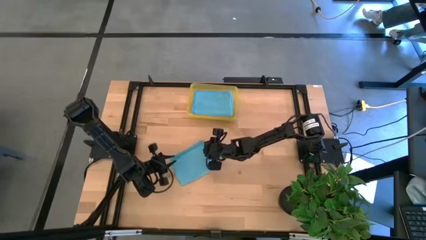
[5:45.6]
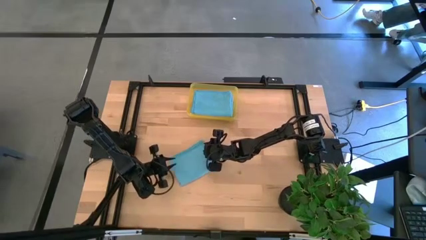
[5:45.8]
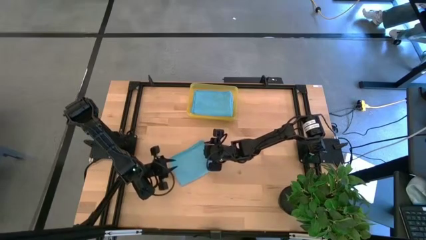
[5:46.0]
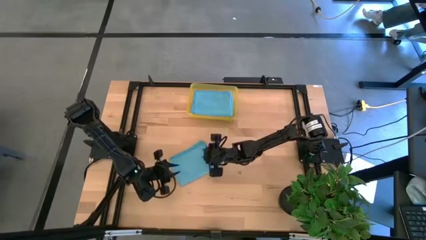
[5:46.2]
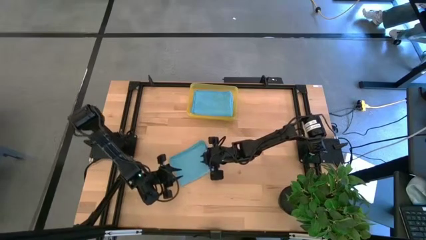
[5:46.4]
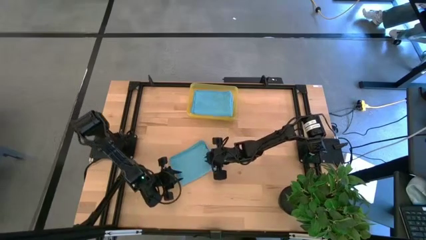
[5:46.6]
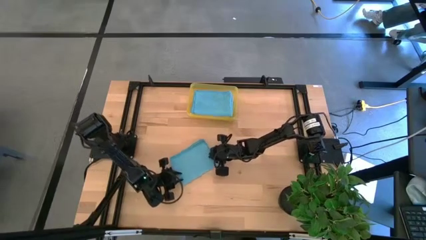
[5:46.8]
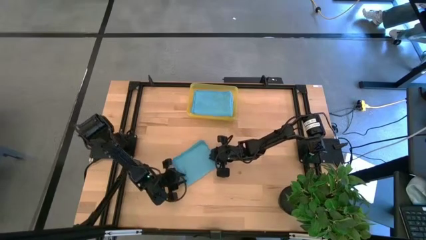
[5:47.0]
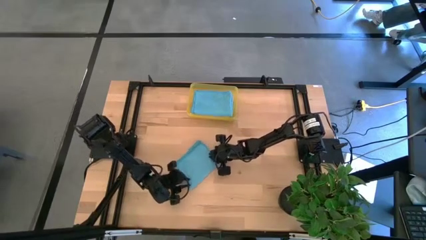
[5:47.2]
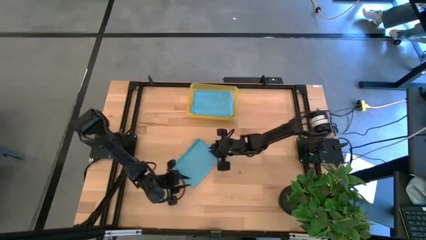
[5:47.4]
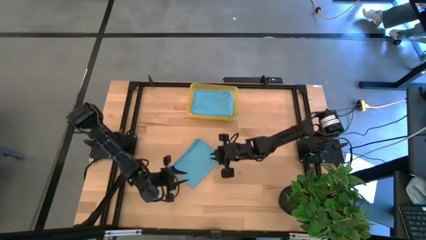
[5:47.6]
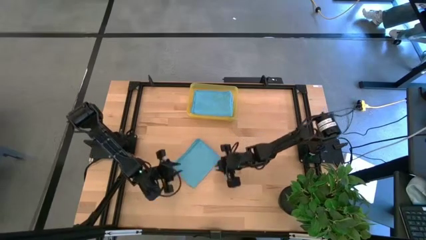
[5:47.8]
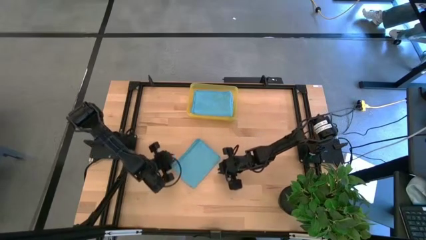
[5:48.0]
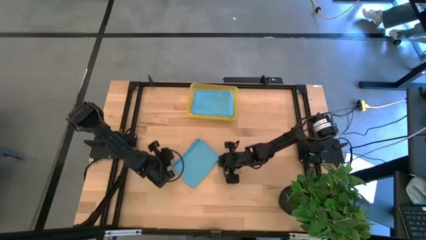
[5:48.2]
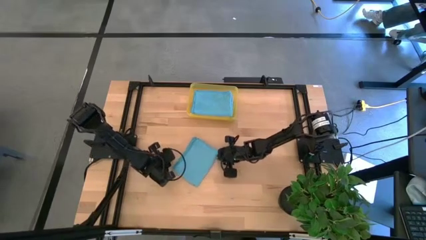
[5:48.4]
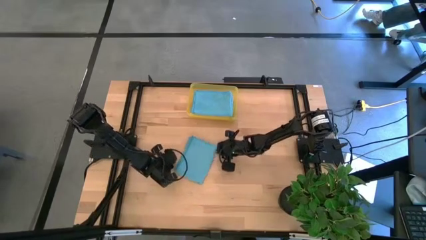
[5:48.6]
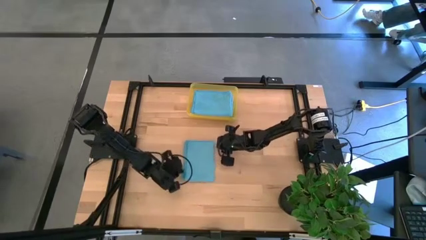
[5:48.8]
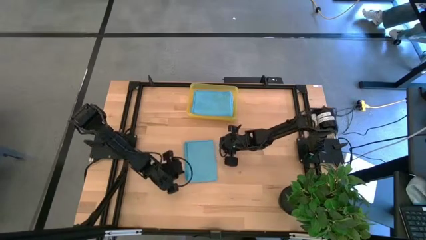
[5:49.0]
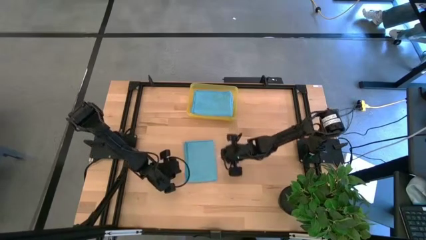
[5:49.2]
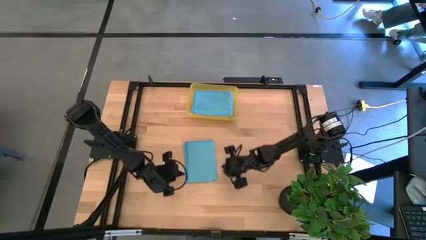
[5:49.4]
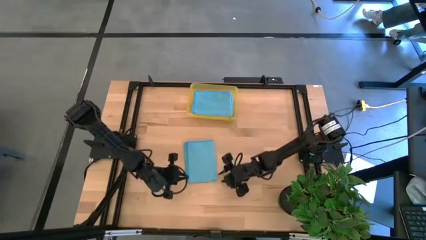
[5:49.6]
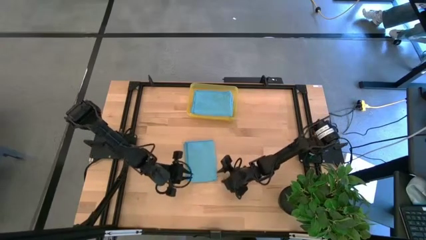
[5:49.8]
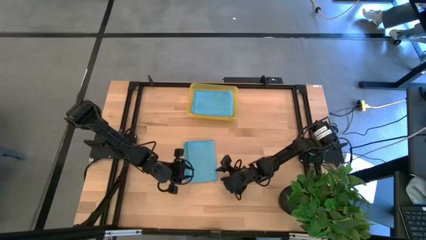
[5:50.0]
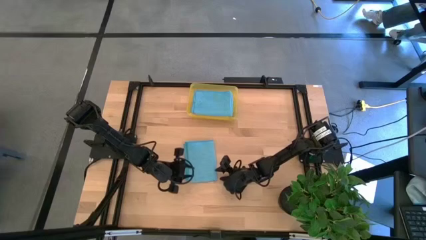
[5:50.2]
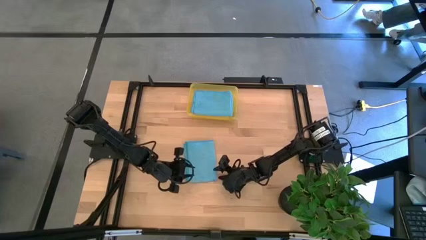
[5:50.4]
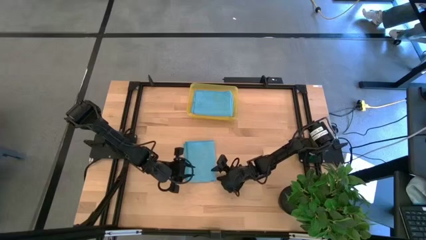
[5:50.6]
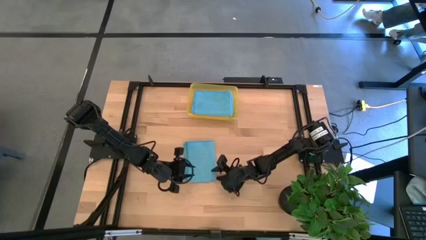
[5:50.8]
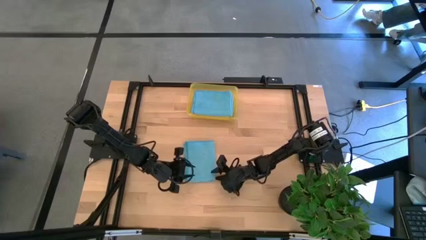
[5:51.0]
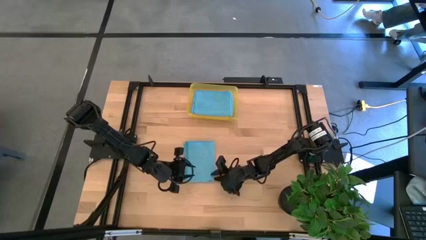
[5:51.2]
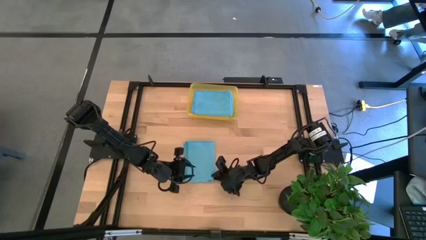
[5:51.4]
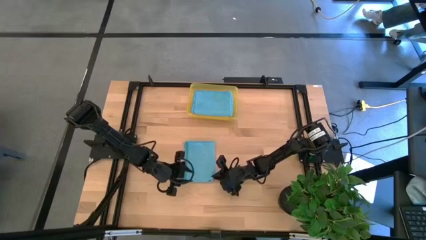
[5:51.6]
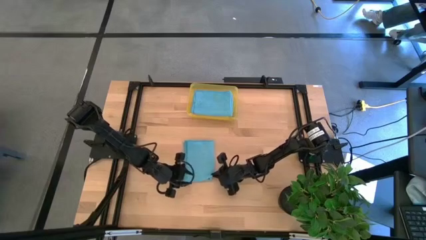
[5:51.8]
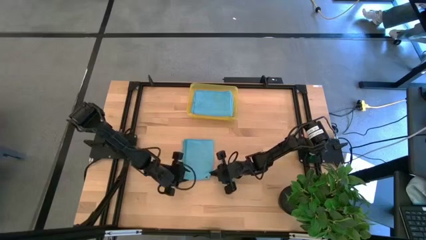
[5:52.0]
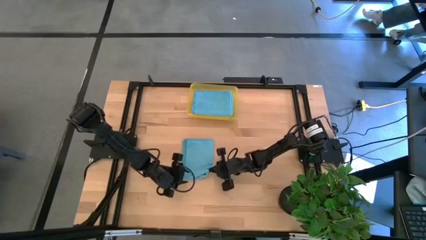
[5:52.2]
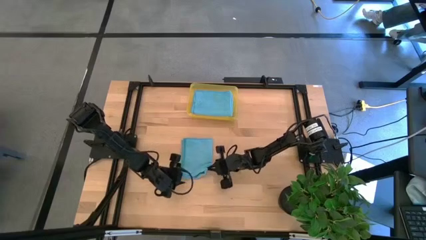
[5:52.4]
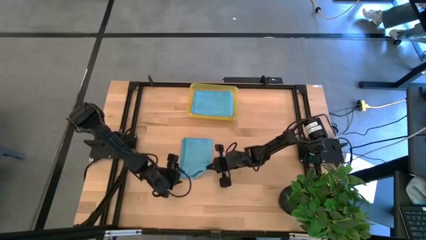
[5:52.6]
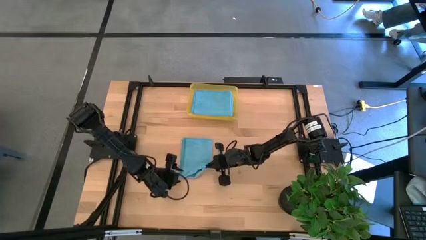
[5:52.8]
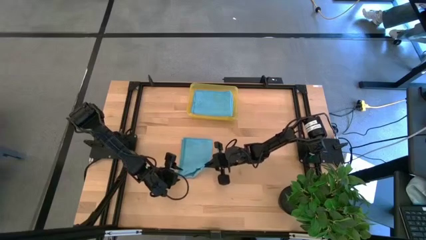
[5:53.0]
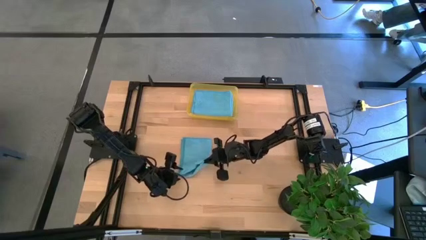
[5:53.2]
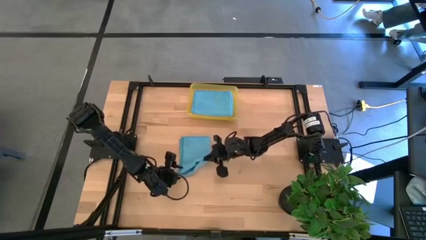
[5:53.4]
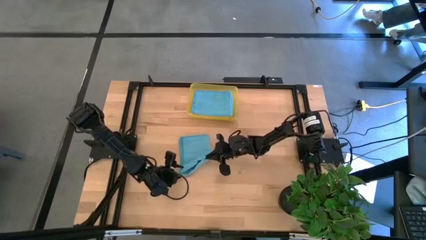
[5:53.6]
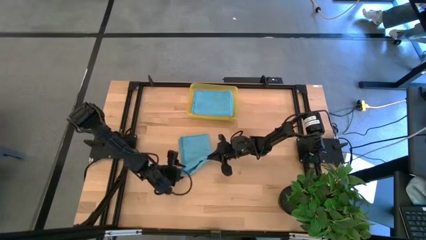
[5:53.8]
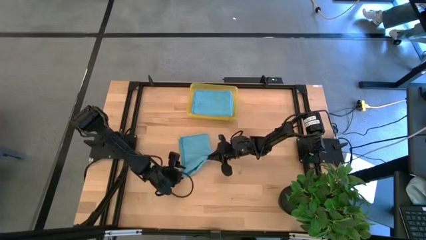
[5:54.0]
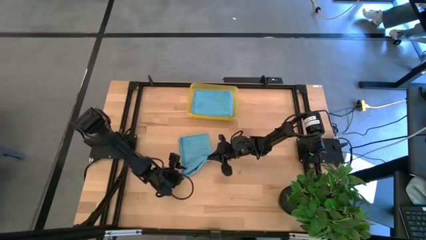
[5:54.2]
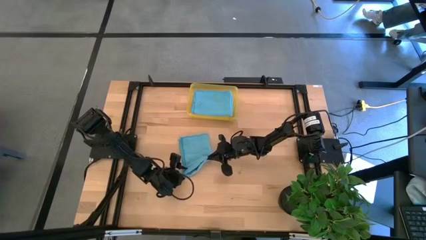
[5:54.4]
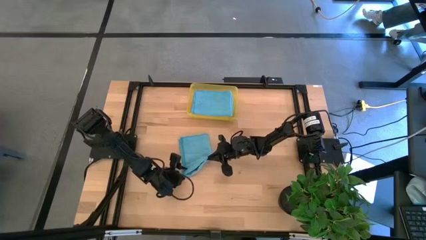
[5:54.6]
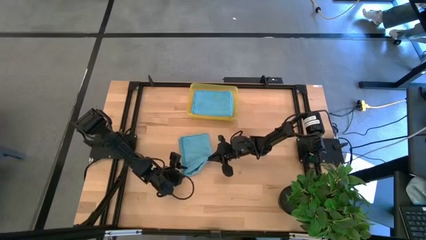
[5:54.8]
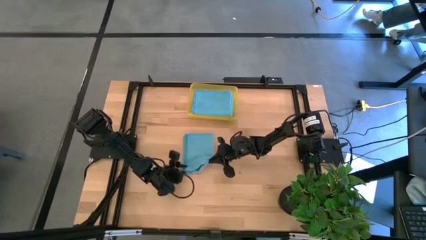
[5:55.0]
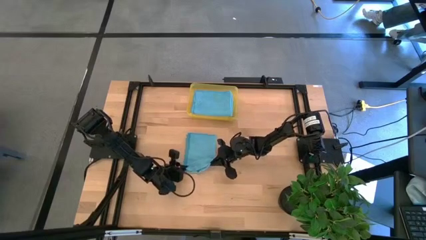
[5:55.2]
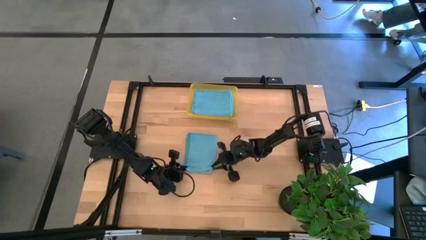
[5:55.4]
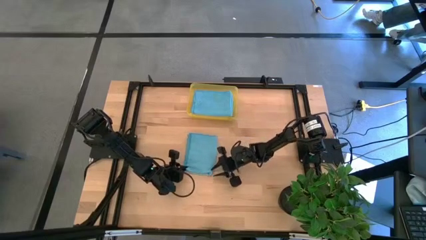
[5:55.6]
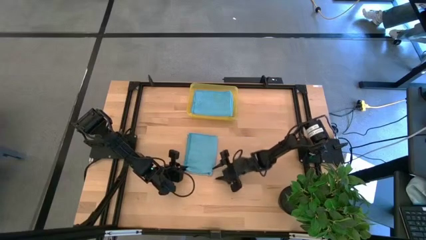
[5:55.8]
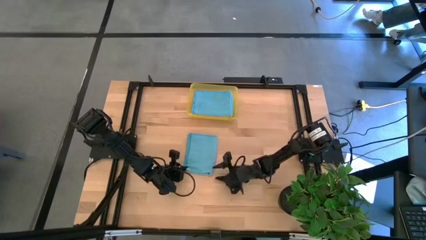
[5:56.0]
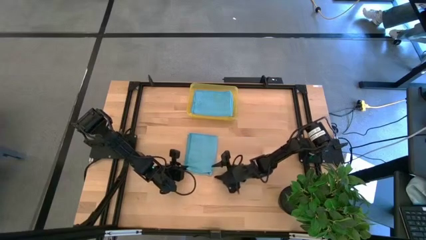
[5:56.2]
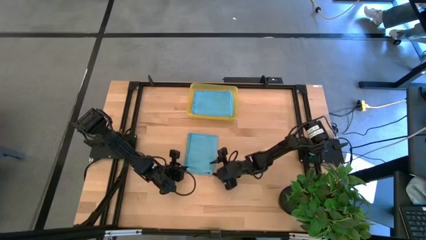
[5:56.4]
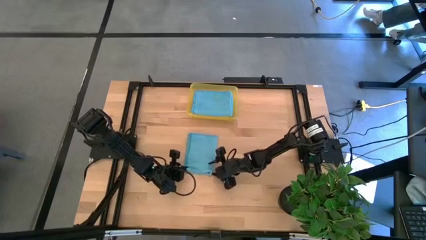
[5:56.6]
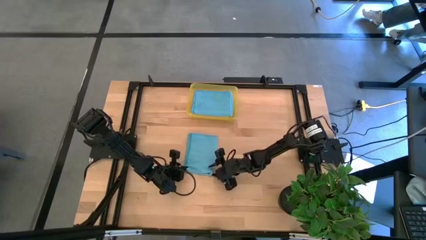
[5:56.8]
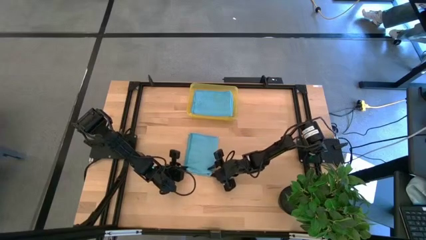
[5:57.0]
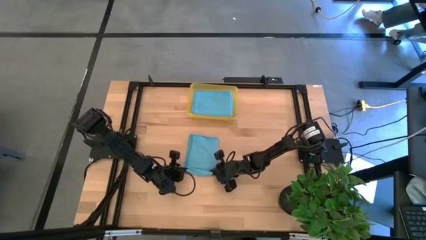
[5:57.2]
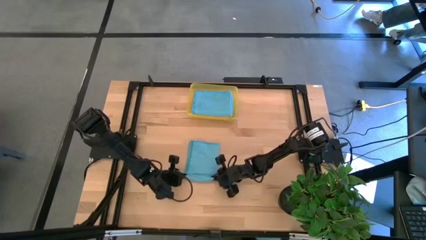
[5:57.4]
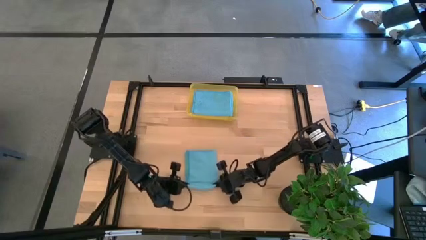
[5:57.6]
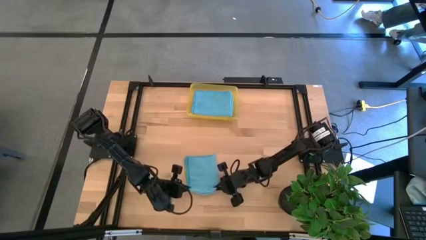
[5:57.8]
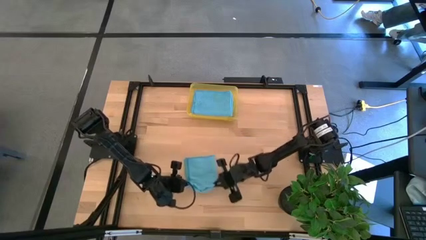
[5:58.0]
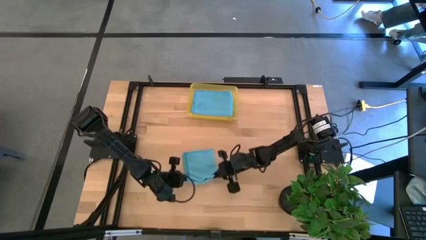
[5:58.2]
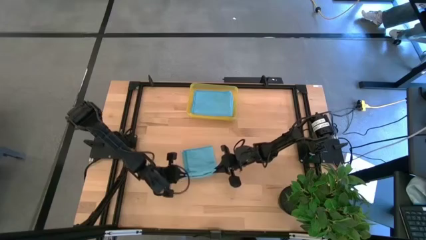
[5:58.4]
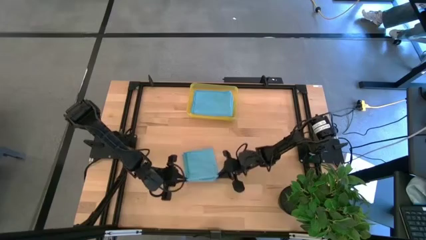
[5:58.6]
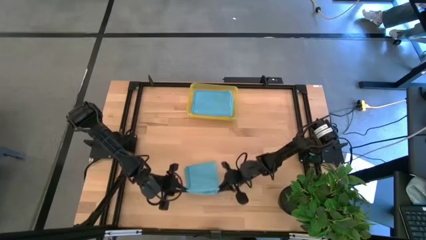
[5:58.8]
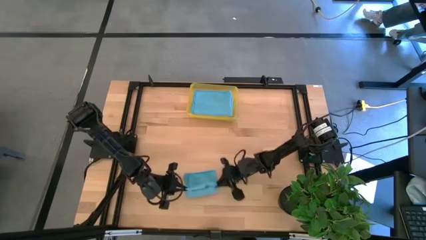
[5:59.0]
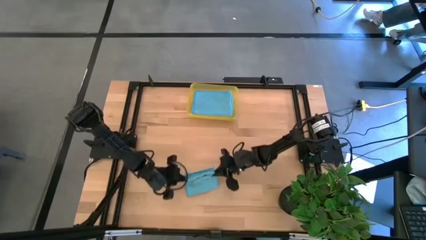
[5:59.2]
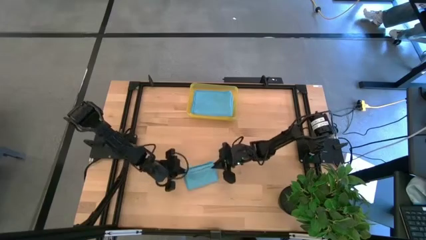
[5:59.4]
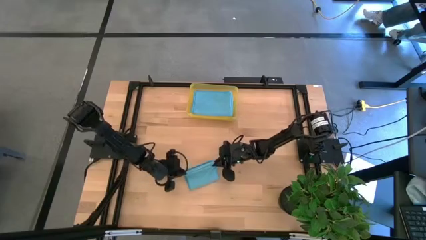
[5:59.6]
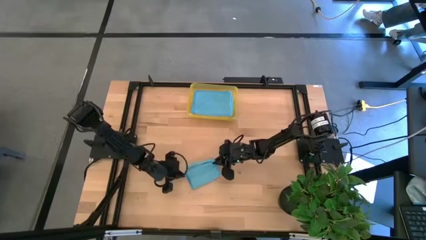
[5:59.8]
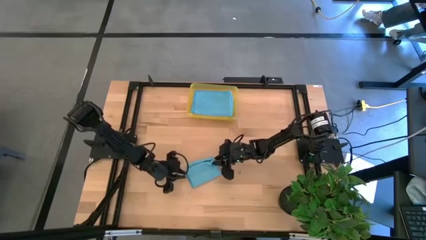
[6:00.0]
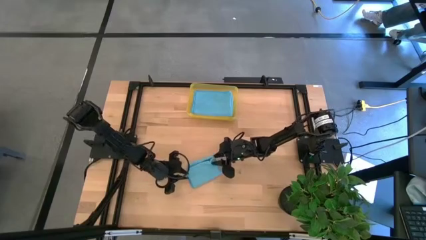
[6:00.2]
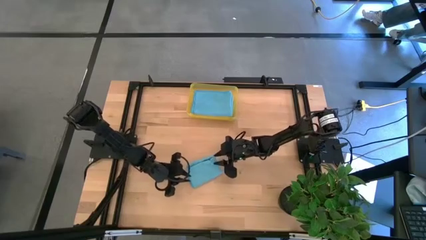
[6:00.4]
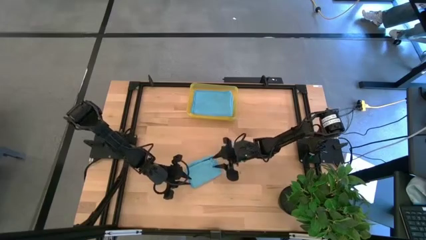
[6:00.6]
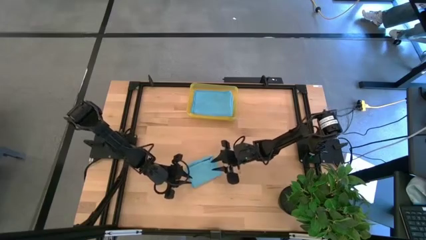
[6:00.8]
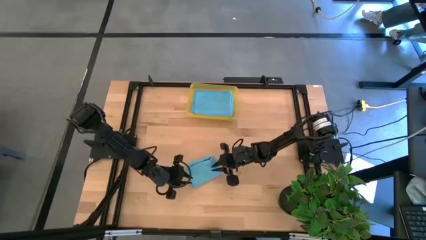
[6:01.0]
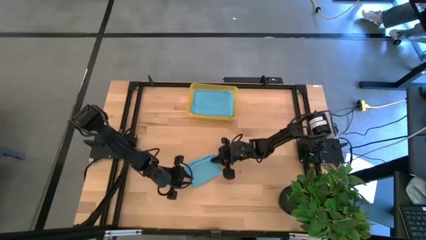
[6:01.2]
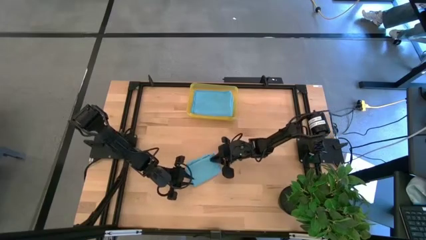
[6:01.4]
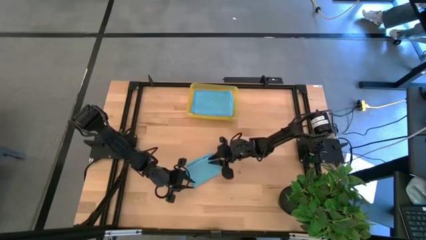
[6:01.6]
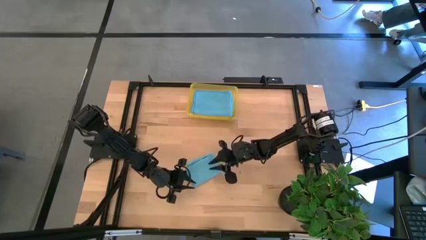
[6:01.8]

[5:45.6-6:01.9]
Task: Fold microfiber towels
Fold the blue towel
